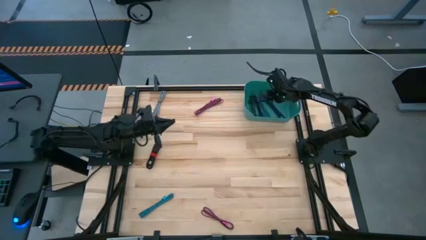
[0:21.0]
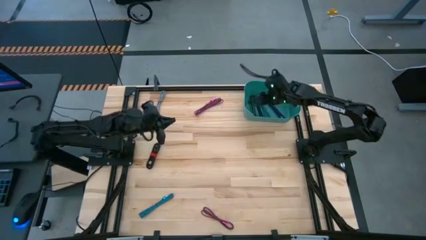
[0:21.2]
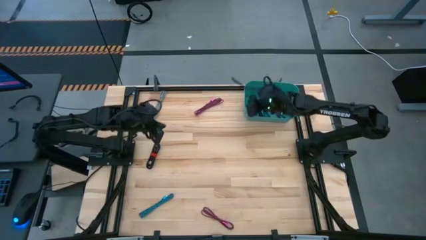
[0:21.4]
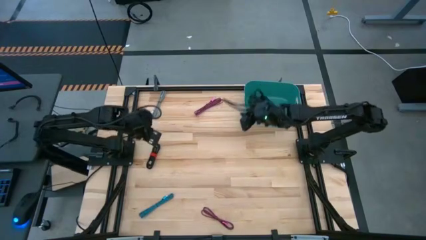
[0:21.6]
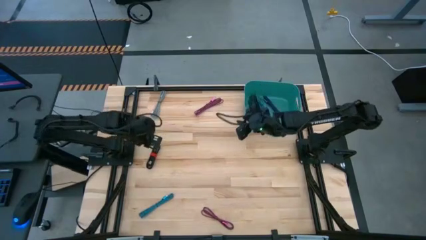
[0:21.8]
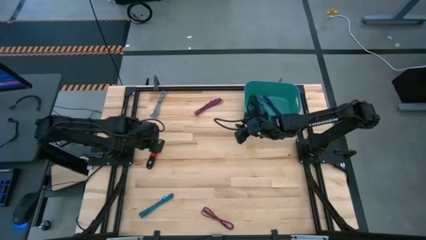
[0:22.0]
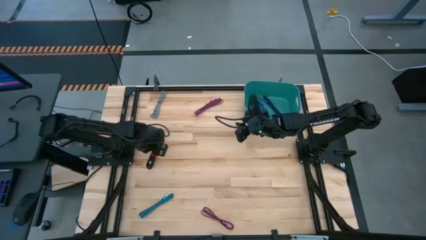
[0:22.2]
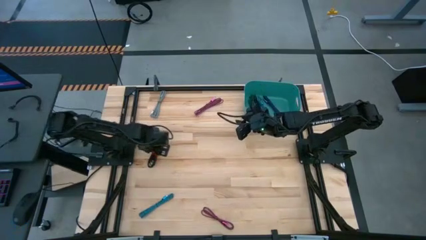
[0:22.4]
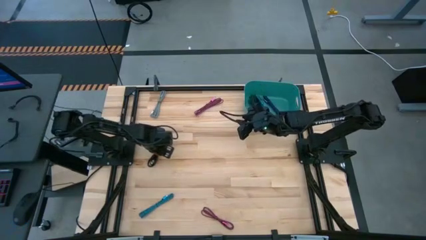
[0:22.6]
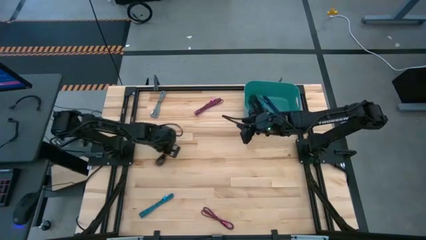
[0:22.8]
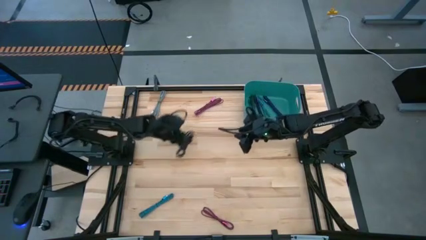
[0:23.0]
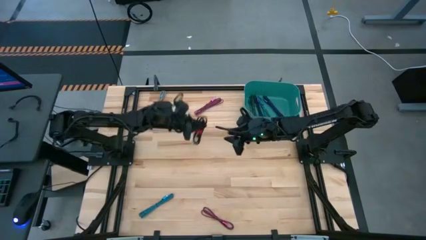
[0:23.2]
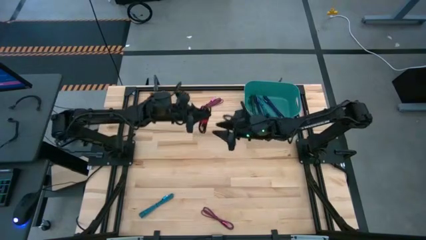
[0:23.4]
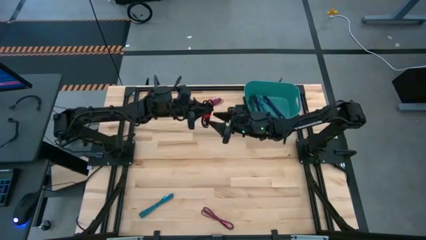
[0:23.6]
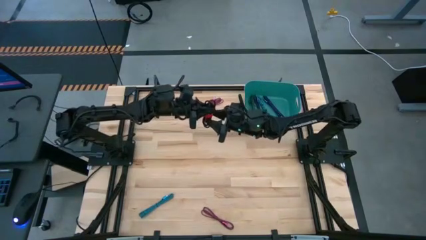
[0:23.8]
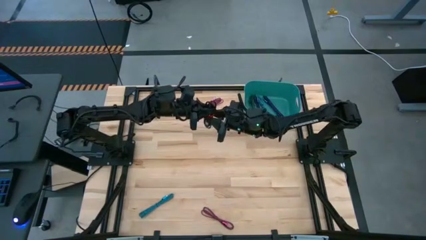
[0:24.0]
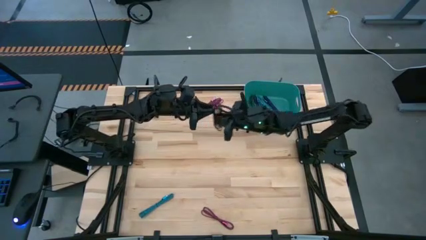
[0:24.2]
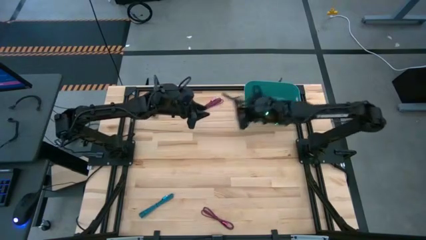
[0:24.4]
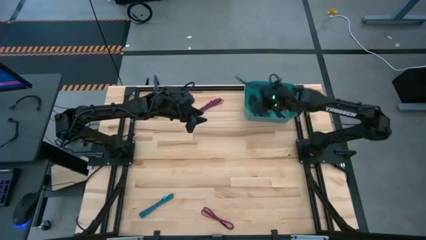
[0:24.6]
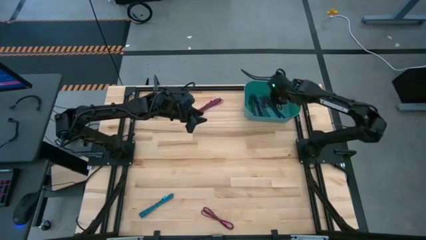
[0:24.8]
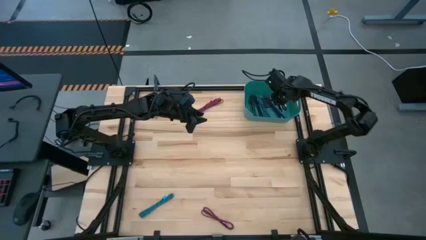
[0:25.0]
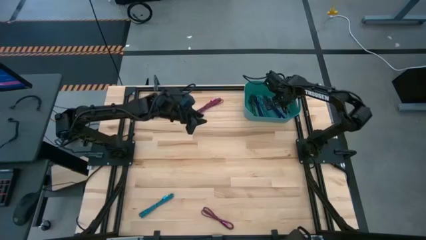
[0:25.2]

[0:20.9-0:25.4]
Task: Pick and place USB-C Cables
Put the black charger cable into the blue bin

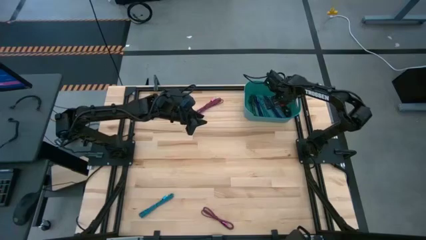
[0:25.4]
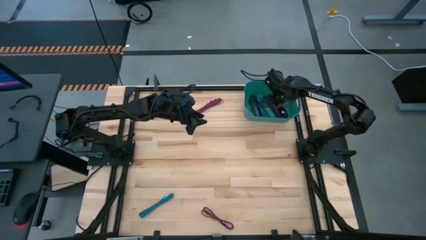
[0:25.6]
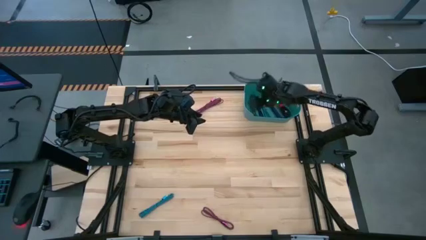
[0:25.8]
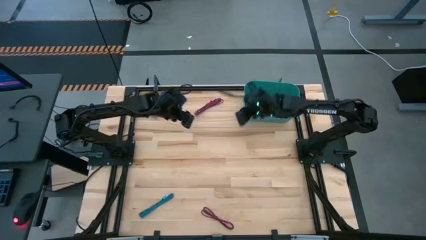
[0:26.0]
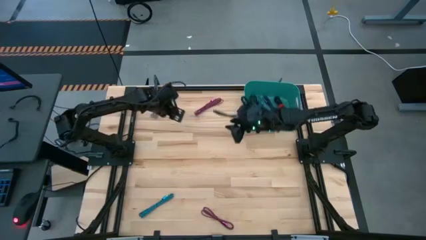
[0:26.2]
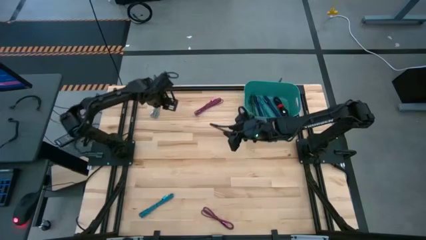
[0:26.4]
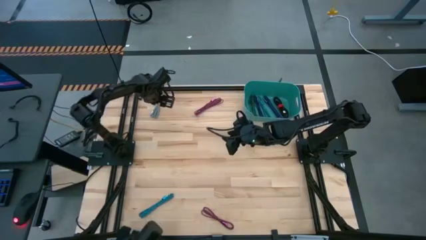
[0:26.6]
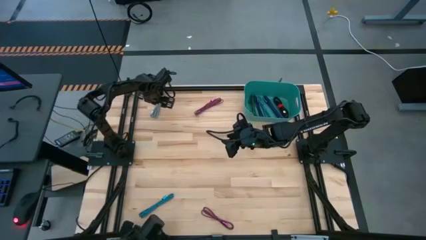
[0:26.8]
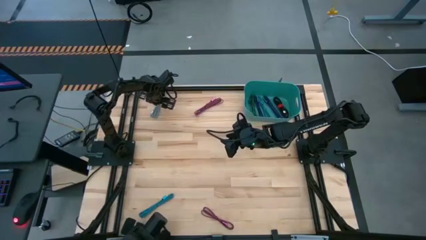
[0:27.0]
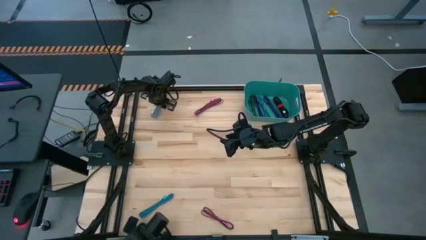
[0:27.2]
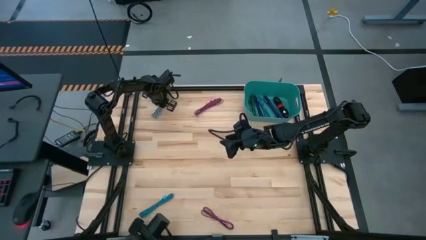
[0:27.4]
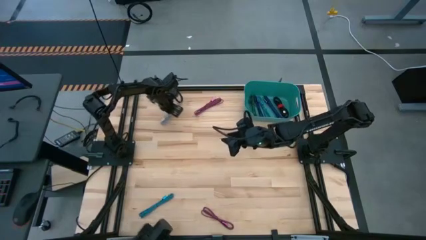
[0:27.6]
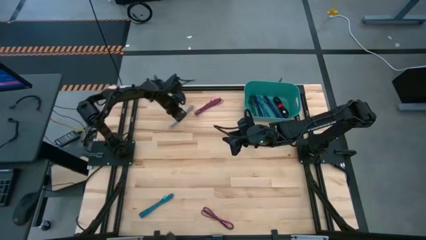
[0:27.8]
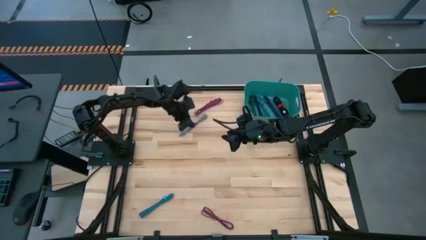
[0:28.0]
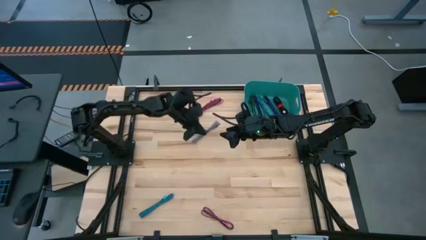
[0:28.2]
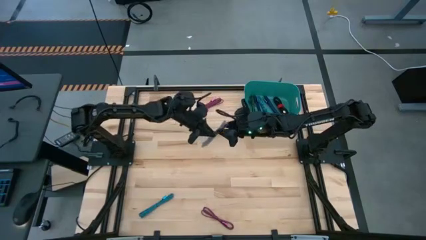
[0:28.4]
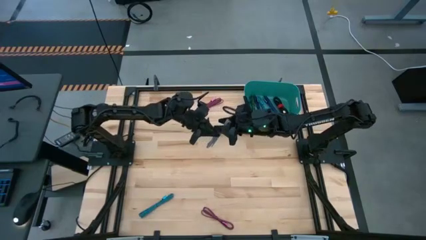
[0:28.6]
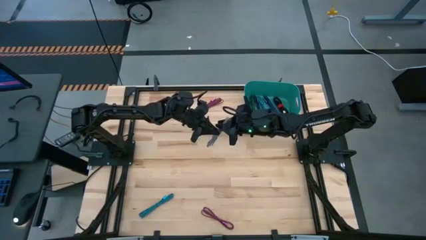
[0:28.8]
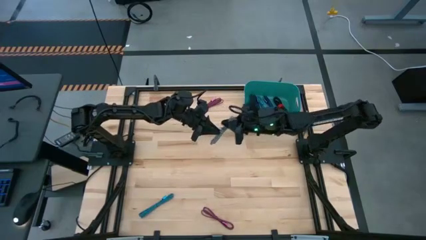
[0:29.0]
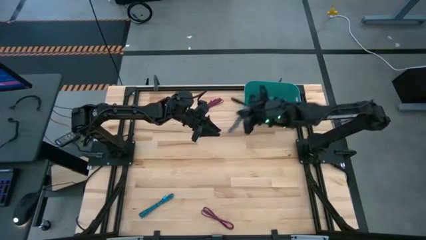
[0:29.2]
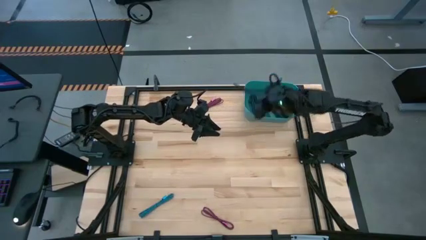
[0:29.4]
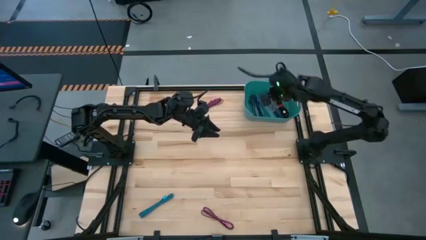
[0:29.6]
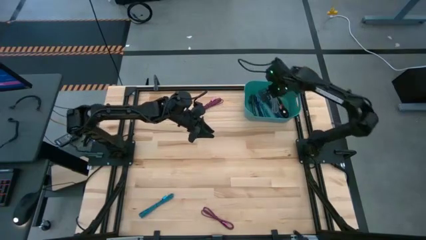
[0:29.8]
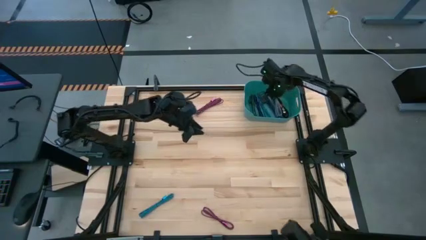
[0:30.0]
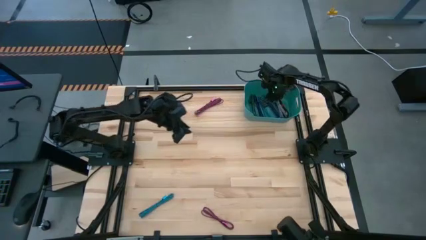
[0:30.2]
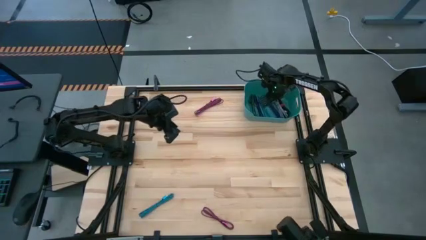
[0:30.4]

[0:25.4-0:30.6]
Put the white charger cable into the blue bin

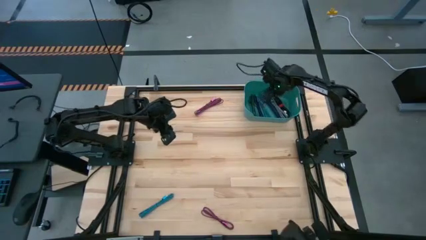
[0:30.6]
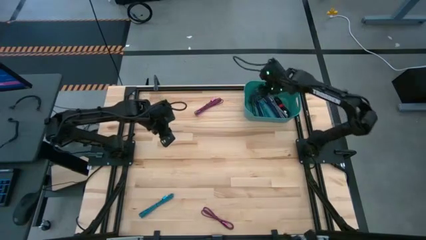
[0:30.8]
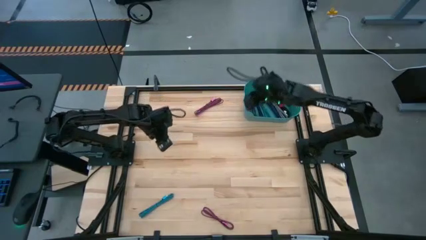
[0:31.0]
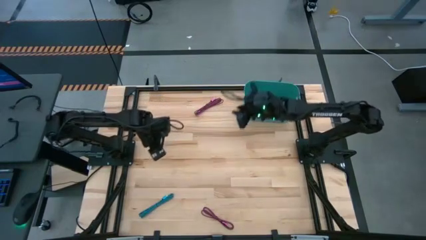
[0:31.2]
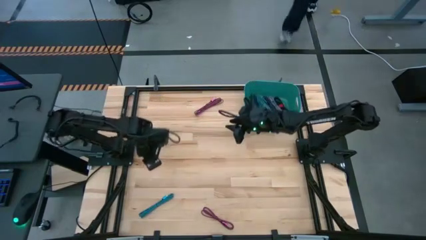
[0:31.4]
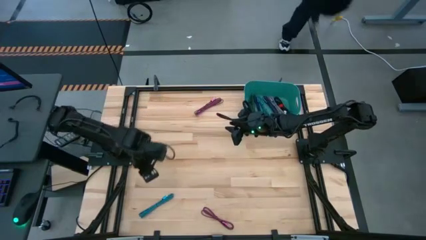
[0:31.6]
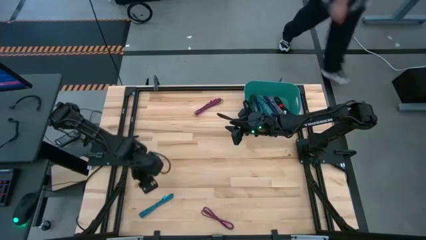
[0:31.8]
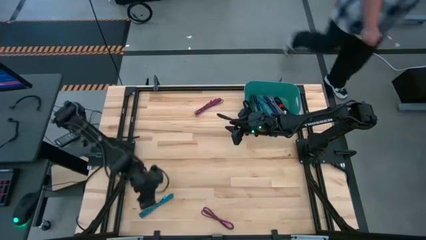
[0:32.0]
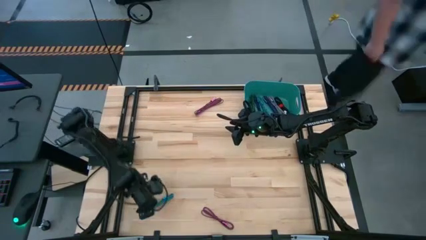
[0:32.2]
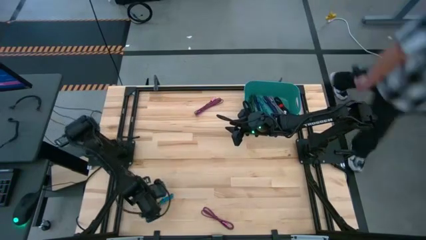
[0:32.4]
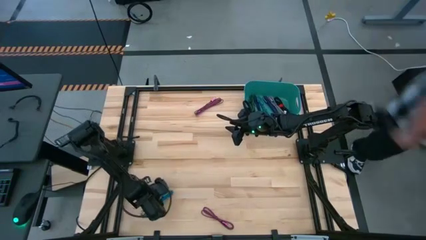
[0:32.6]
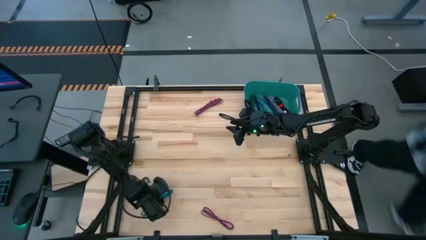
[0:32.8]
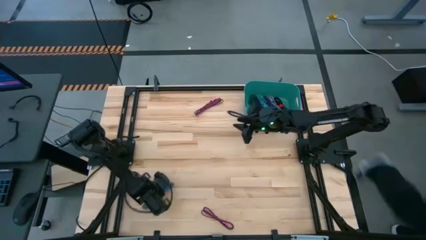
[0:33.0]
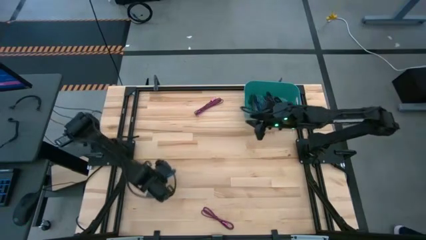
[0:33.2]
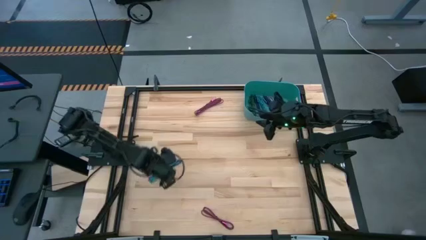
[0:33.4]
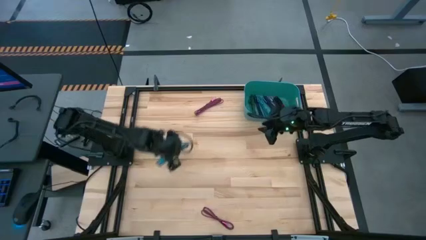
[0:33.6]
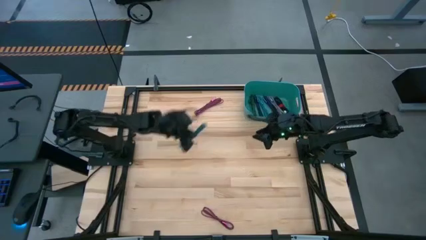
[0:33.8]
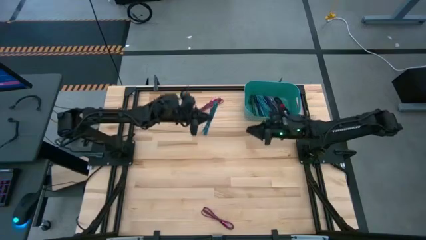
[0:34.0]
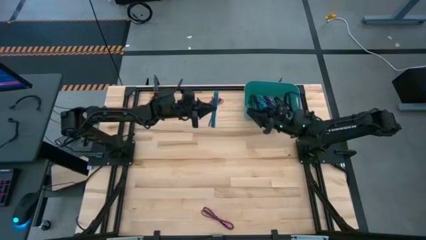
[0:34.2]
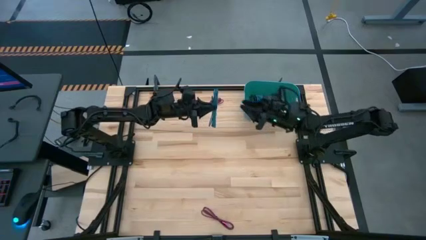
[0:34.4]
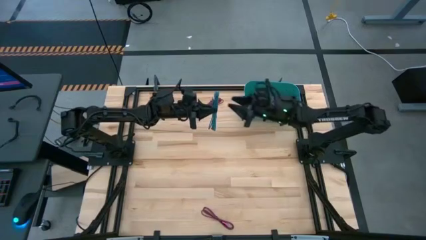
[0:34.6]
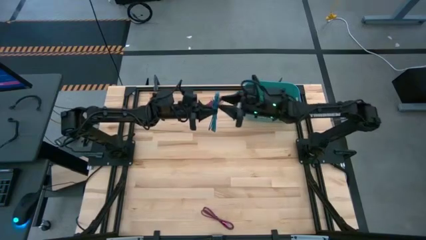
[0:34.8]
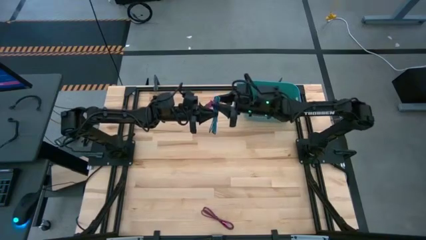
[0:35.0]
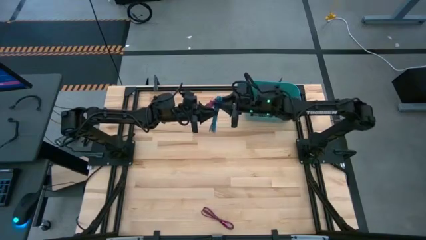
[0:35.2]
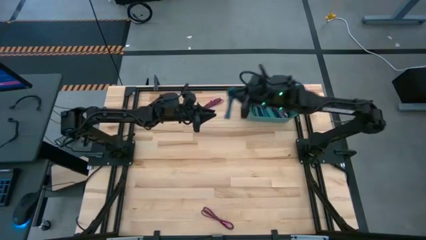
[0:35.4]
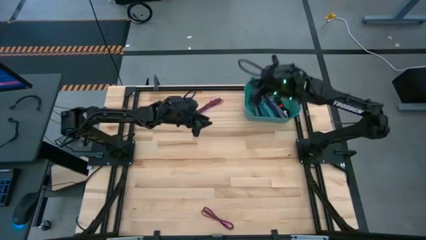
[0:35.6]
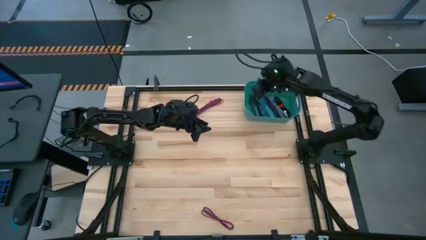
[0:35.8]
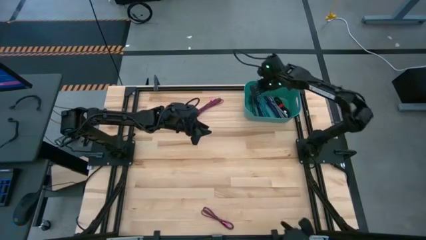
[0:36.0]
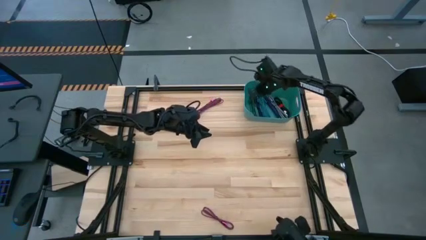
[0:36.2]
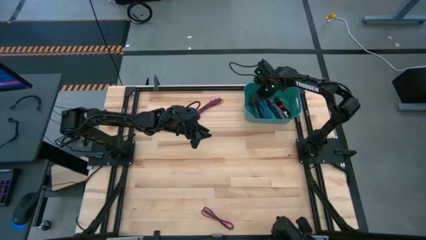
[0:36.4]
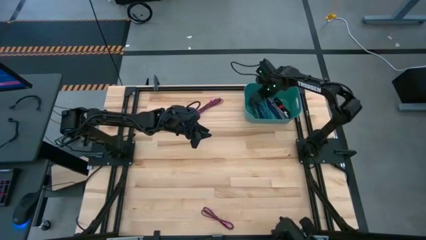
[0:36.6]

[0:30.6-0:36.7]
Put the blue charger cable into the blue bin

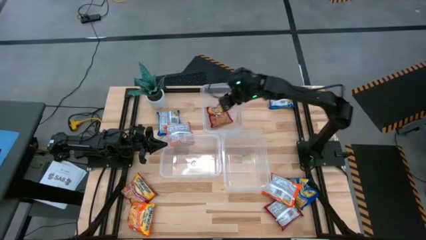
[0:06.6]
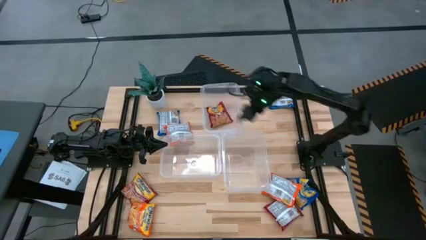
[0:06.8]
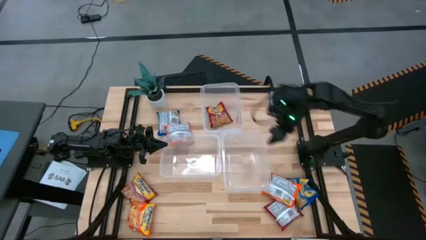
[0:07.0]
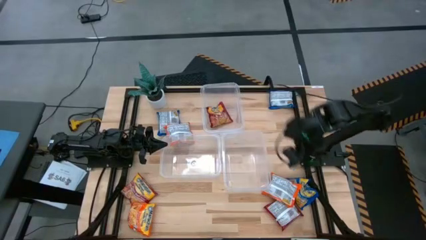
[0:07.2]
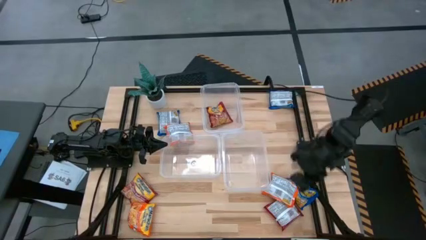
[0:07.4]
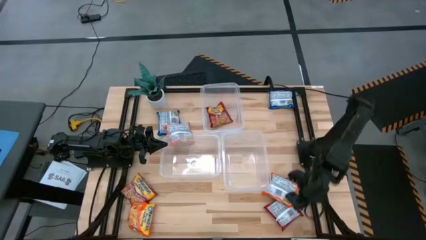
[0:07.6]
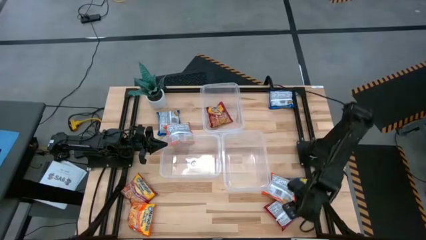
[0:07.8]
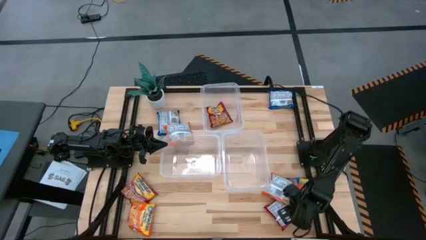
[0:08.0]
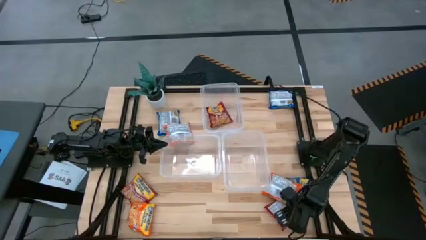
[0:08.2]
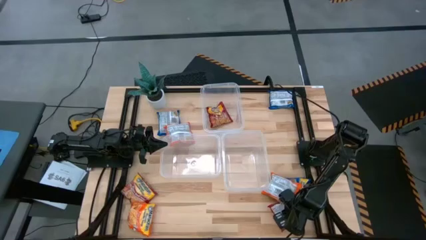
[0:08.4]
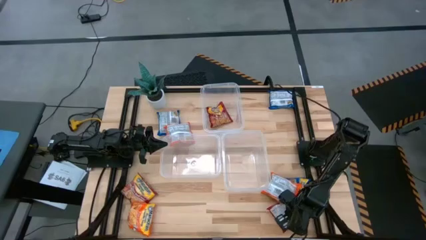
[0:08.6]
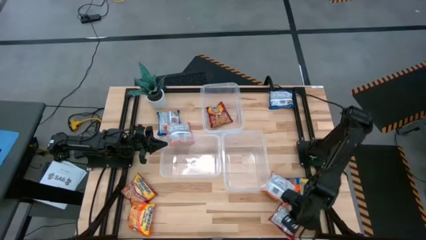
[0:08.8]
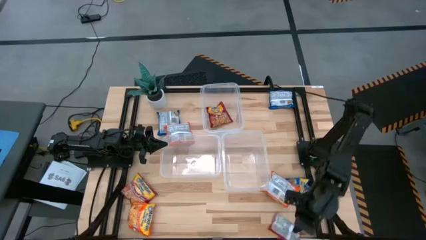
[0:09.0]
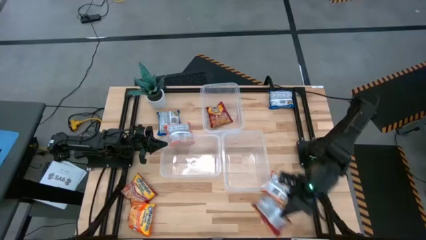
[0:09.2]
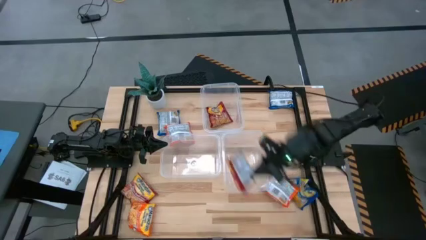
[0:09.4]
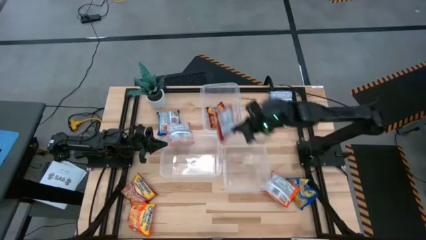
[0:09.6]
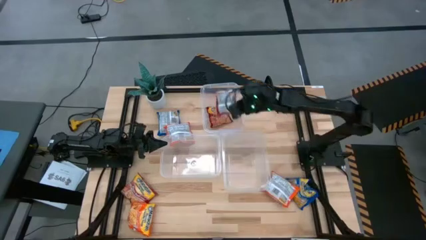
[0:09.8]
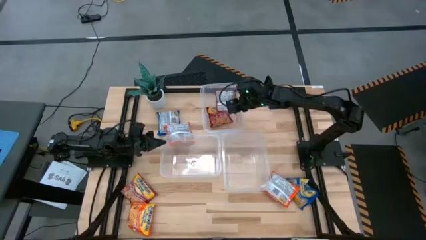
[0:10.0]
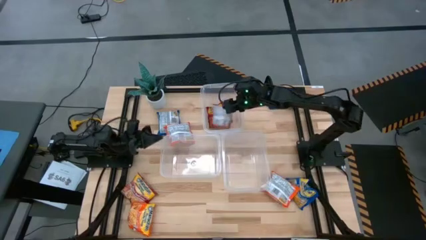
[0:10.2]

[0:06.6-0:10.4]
Task: Sort Maruchan noodles
Put the right red noodle pack into the top transparent bin
